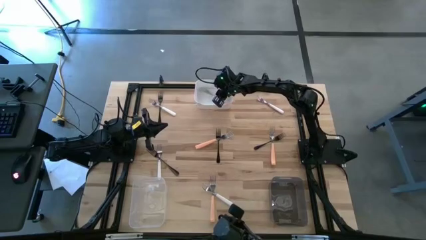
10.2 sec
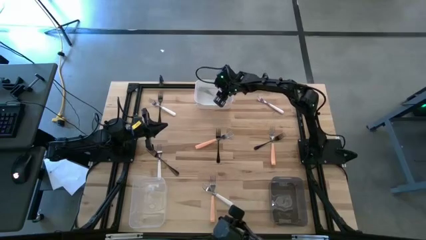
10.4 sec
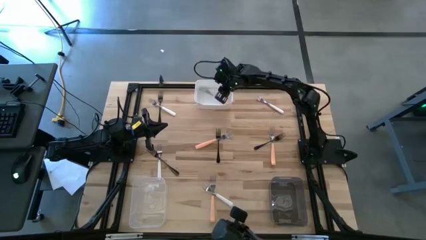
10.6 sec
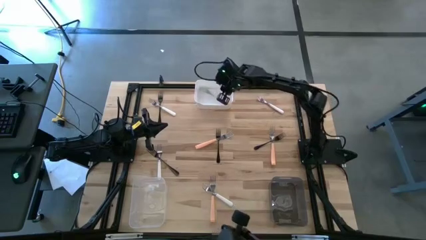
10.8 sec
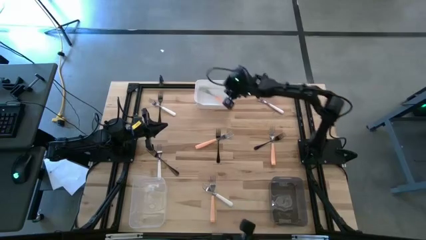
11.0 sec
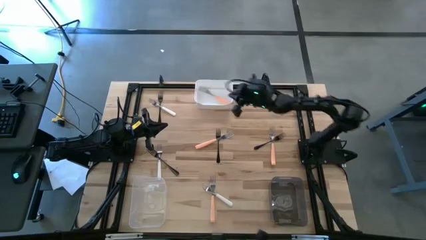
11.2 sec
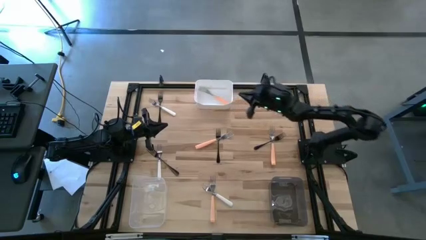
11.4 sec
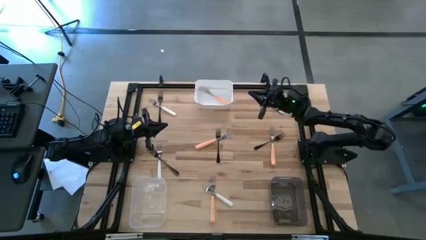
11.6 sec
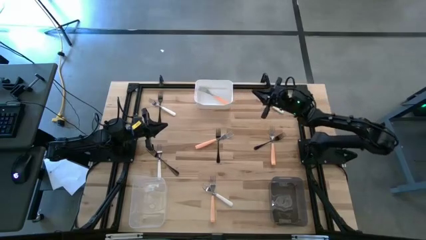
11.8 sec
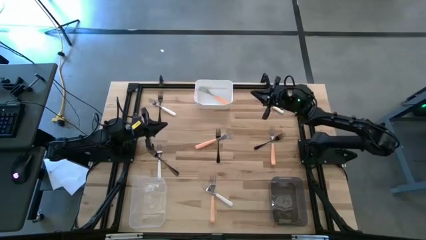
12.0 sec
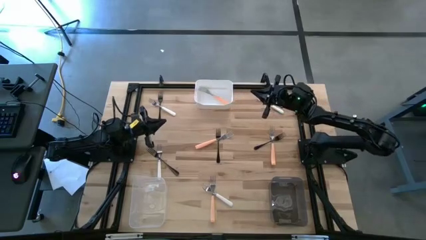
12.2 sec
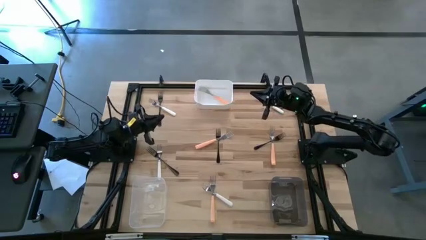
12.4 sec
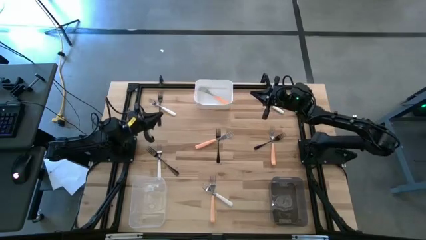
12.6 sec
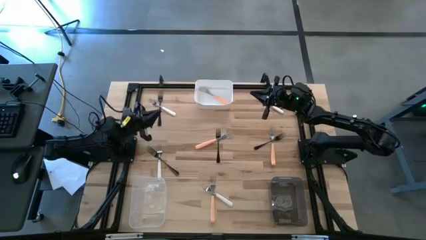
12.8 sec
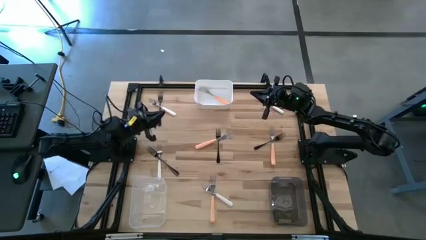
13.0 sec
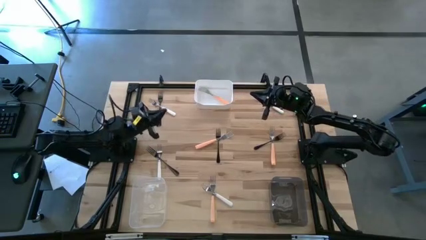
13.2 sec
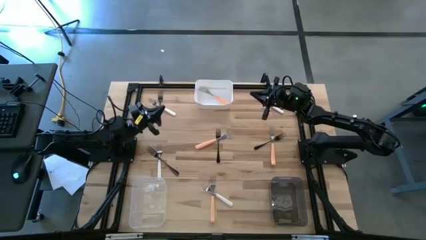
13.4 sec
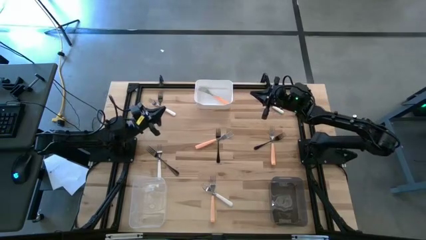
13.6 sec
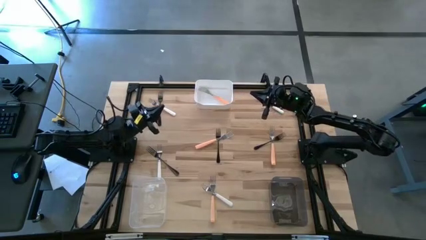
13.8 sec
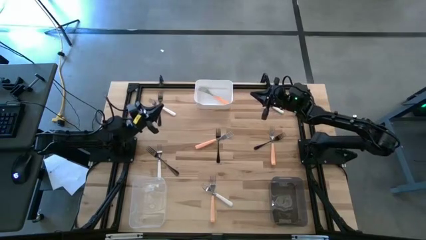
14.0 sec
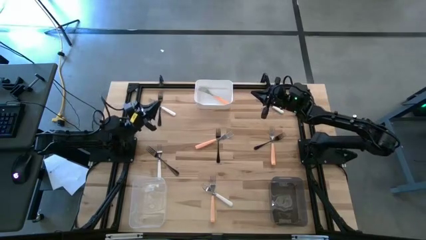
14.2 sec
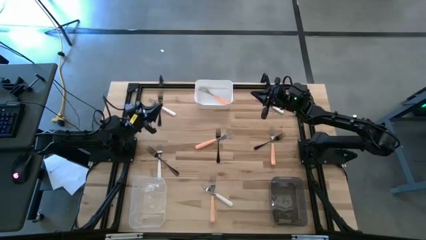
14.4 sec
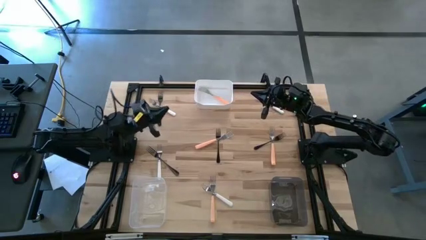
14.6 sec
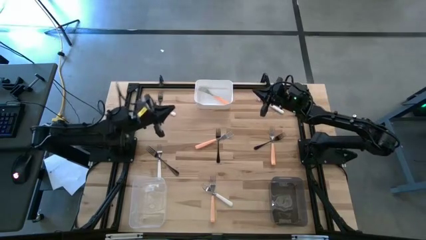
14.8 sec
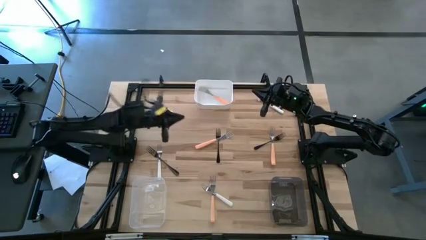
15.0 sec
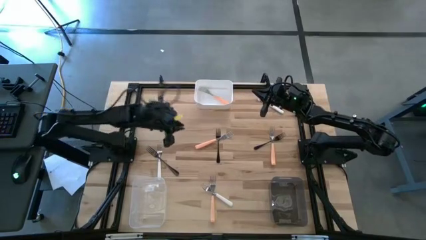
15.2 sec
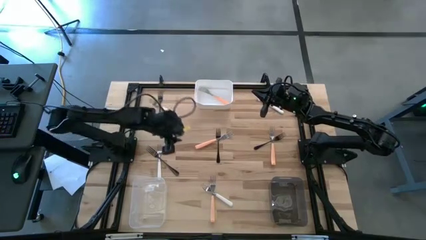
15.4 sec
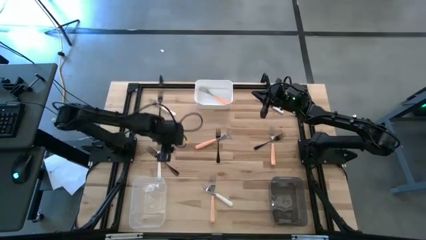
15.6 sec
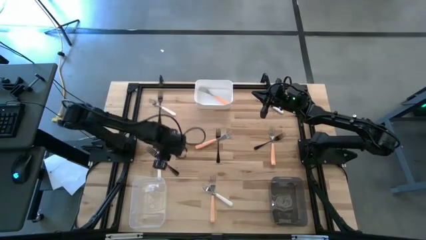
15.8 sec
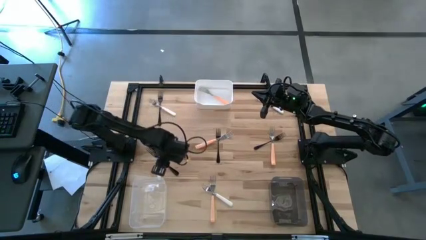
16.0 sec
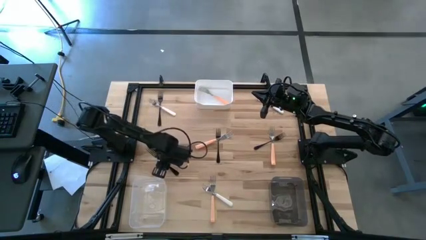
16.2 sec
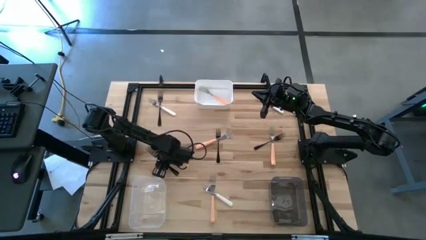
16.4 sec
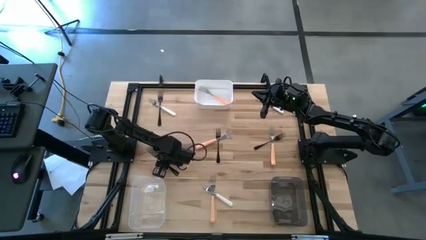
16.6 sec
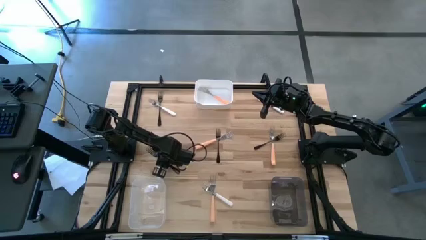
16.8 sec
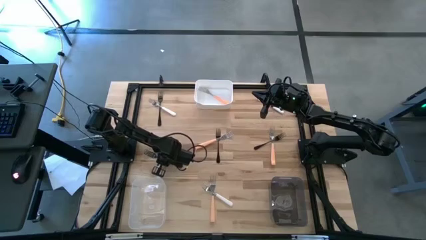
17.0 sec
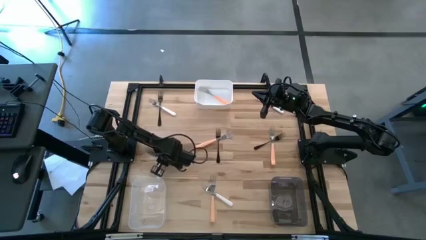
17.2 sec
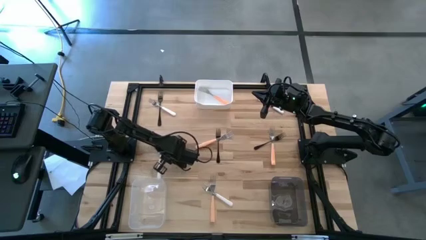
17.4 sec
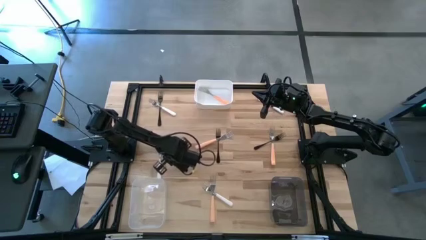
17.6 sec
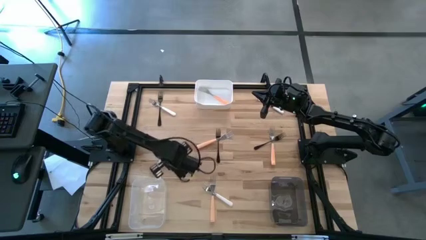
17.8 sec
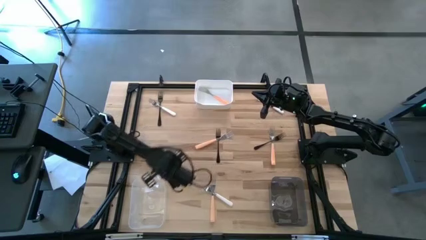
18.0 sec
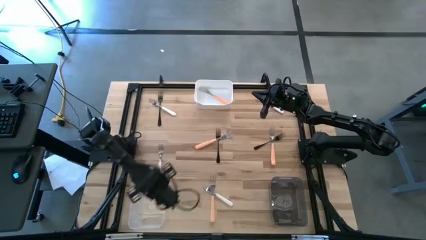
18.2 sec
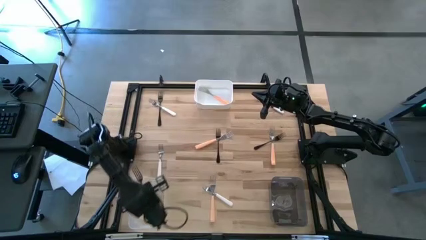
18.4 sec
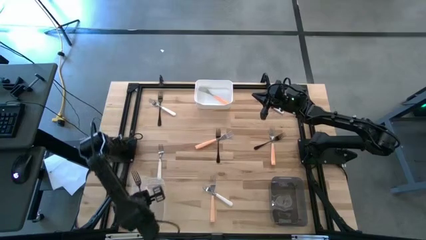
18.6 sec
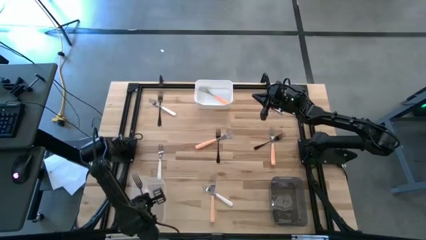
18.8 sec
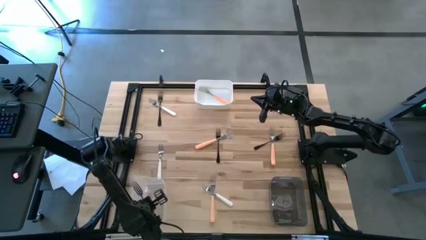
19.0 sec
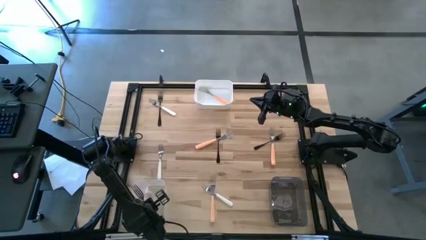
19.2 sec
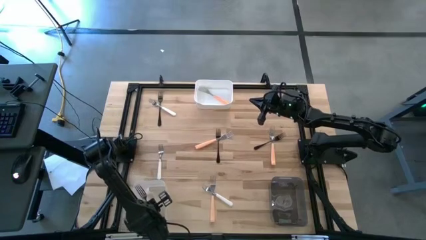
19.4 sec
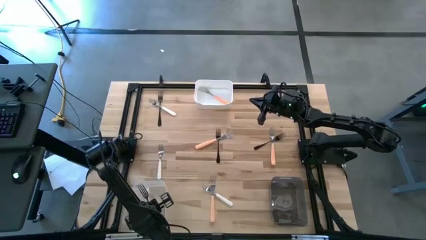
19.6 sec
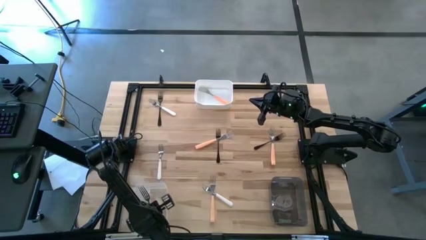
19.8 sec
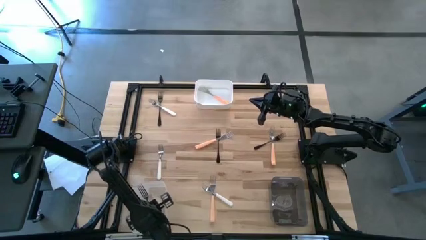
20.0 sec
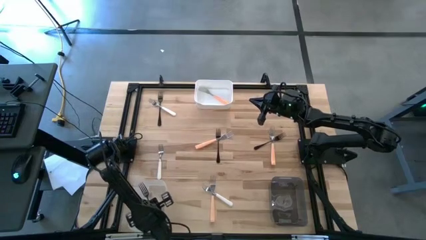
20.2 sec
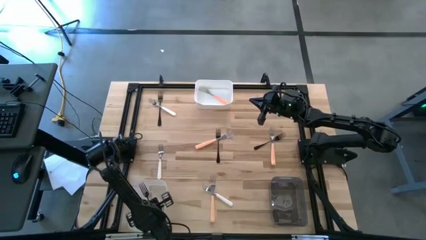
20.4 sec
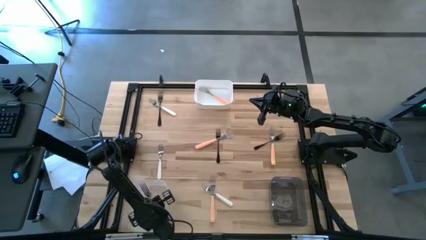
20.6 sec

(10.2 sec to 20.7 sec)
Task: Sort silverware by color (type)
Put the middle left silver fork into the transparent bin

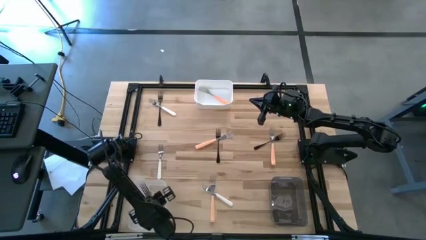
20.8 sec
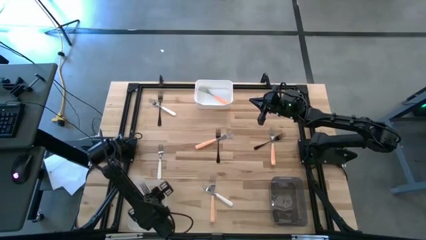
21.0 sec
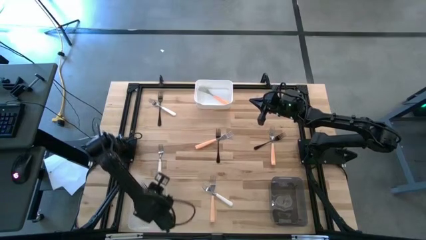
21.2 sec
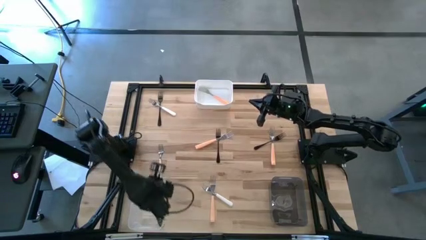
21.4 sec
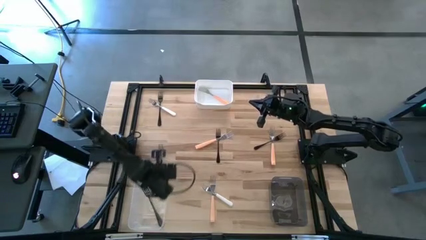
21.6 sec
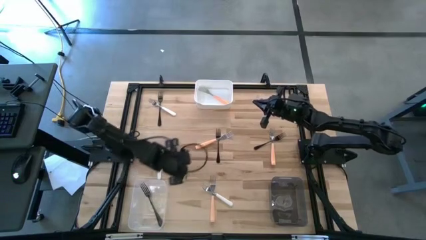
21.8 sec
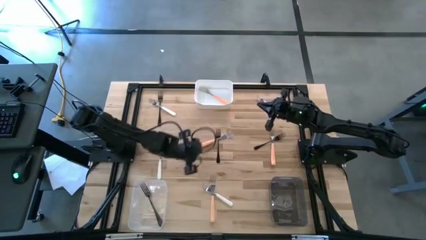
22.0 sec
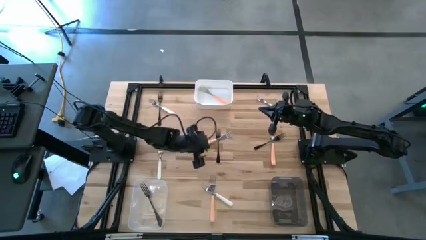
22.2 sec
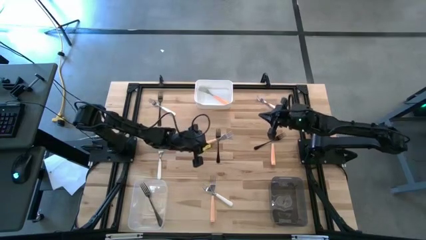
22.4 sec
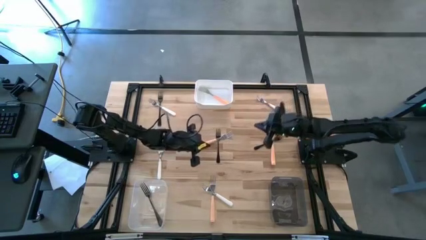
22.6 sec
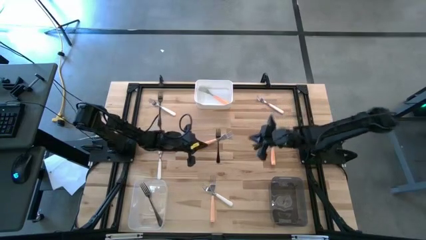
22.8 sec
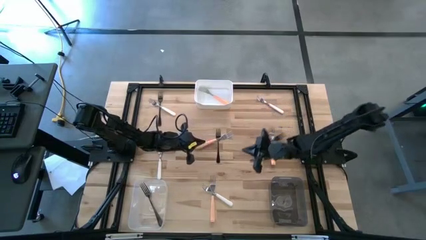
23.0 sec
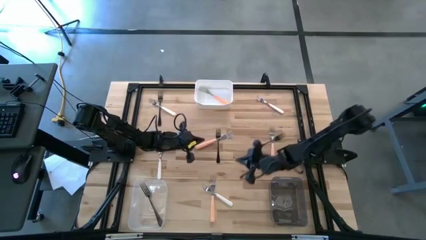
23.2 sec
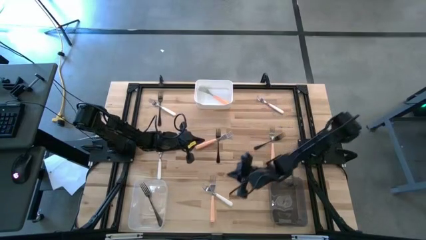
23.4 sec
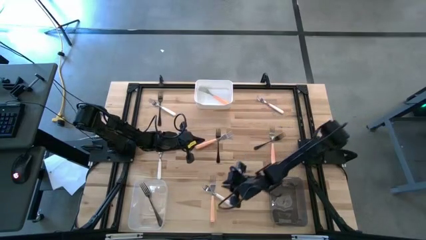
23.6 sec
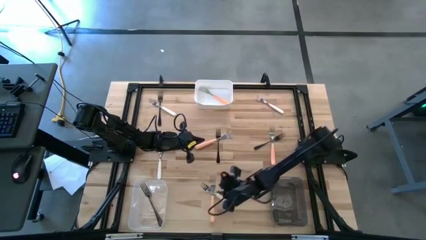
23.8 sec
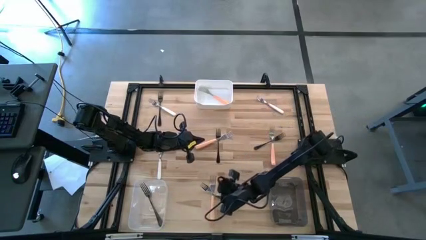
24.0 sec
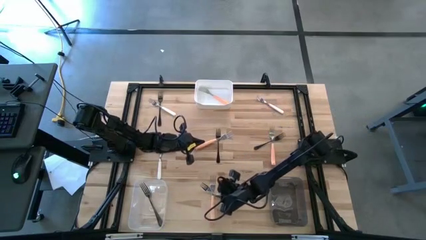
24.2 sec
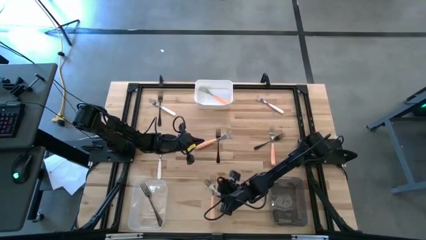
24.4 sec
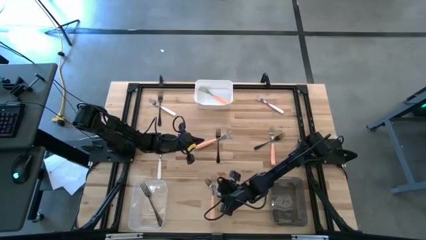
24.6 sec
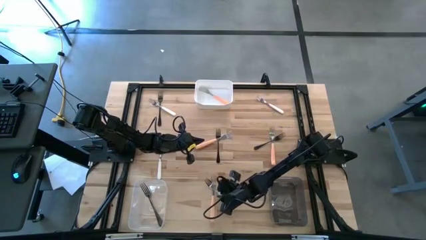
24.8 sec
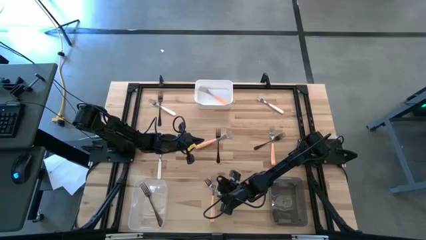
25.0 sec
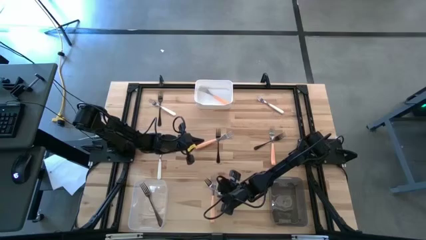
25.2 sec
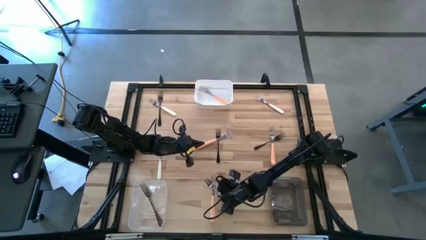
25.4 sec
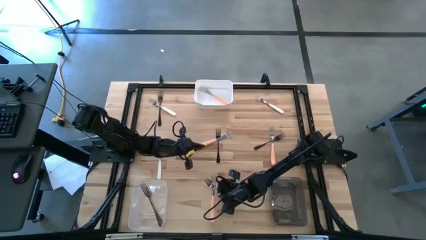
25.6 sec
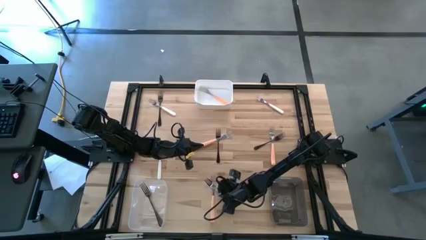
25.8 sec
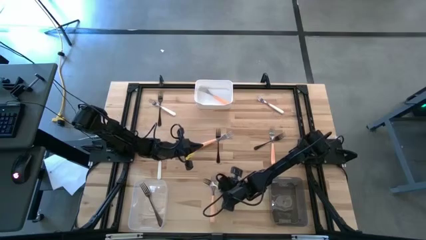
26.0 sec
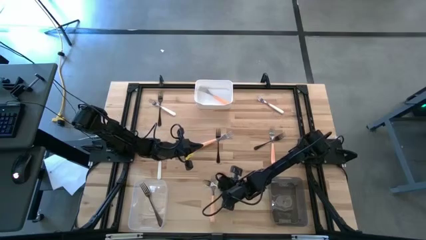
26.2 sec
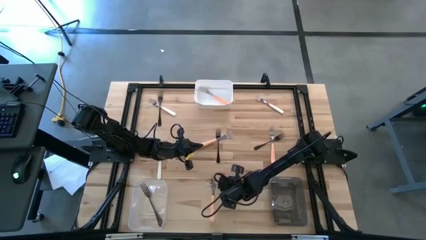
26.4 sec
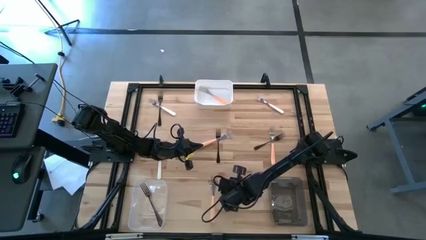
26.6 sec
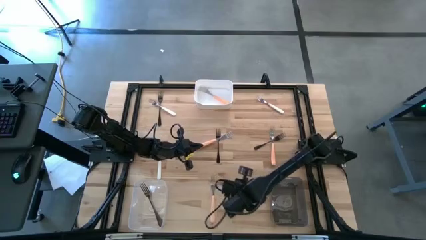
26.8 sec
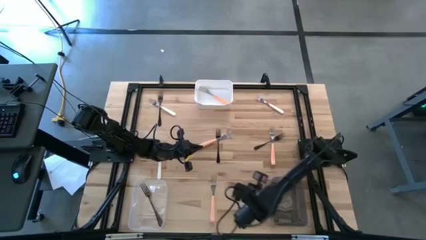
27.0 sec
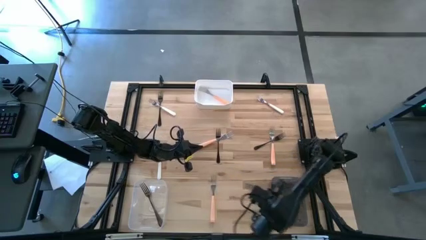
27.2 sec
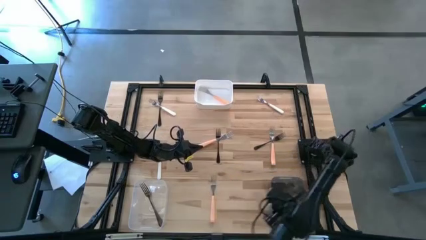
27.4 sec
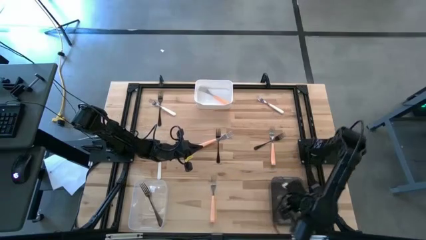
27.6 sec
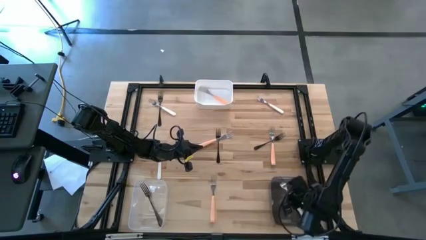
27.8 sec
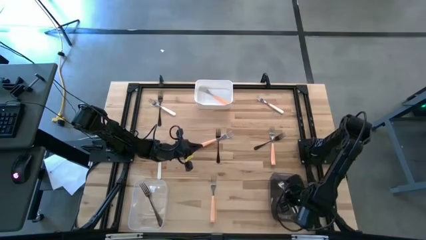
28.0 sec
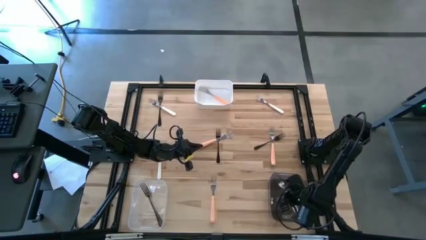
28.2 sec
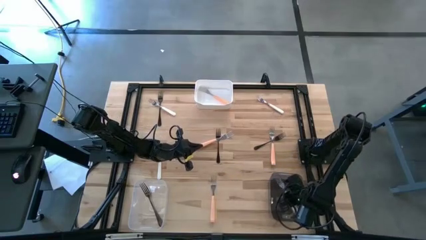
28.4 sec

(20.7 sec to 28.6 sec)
Put the bottom center white fork into the black bin
